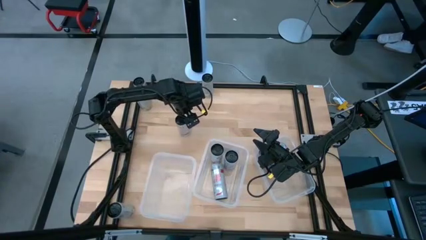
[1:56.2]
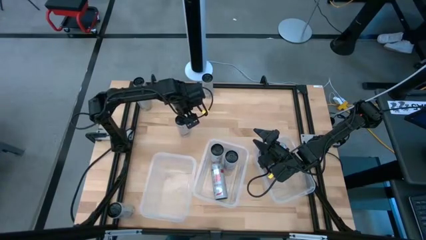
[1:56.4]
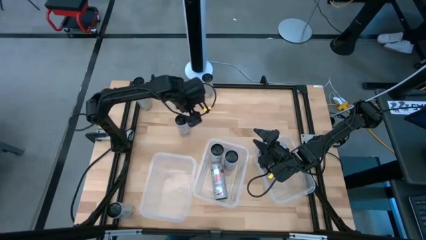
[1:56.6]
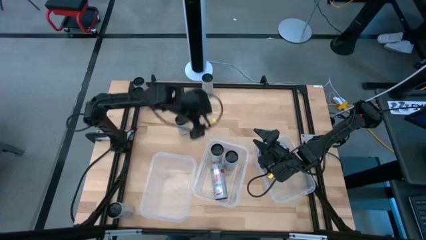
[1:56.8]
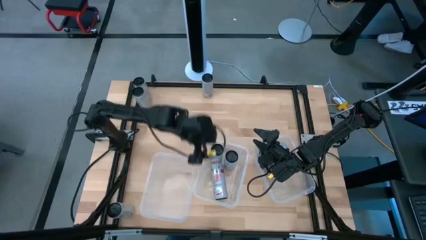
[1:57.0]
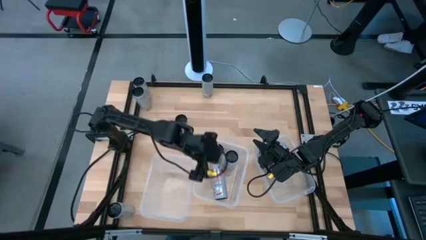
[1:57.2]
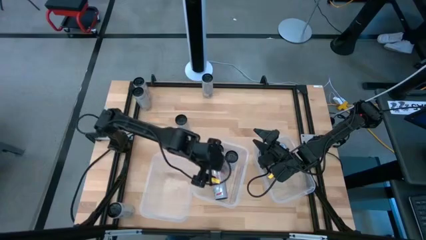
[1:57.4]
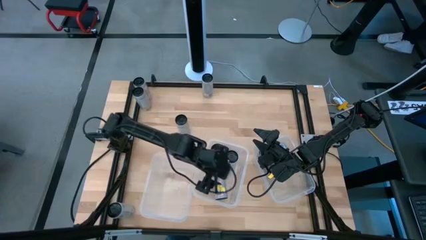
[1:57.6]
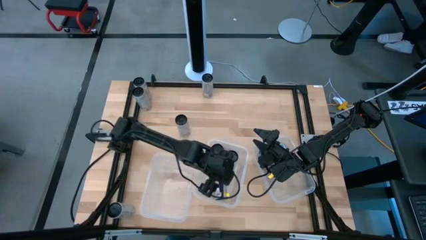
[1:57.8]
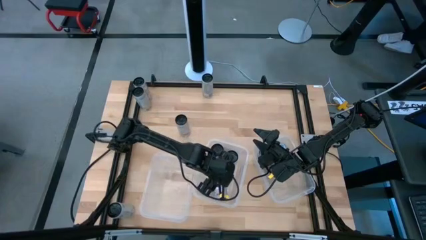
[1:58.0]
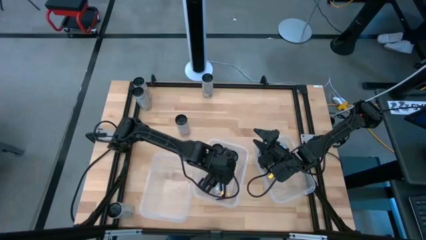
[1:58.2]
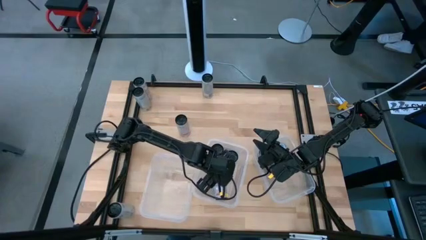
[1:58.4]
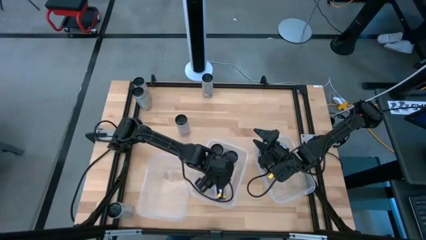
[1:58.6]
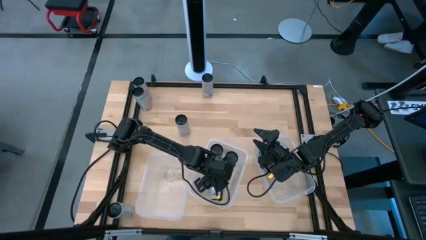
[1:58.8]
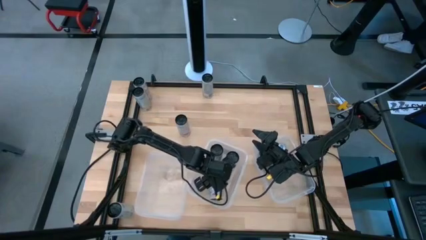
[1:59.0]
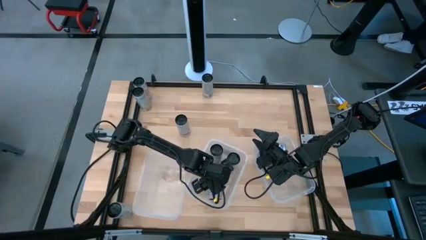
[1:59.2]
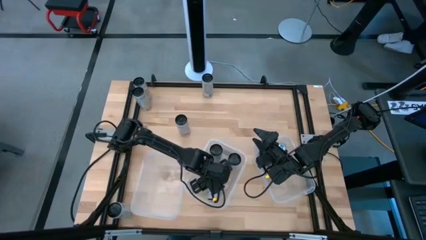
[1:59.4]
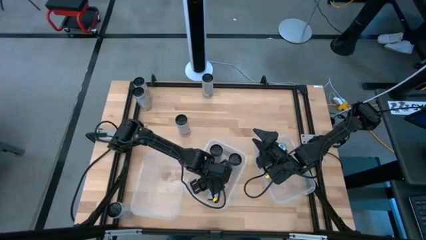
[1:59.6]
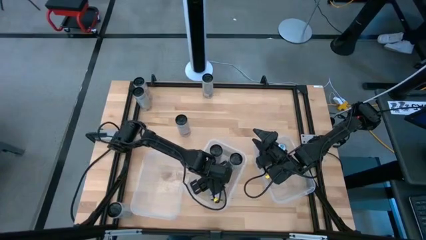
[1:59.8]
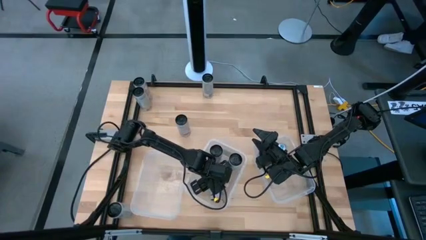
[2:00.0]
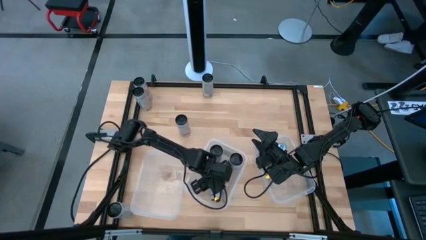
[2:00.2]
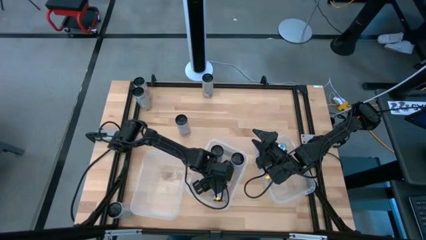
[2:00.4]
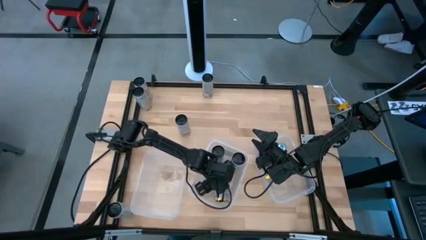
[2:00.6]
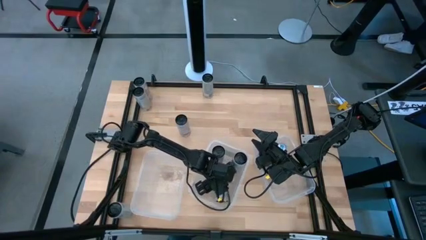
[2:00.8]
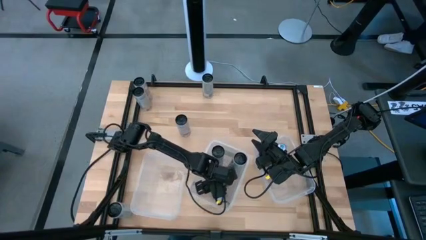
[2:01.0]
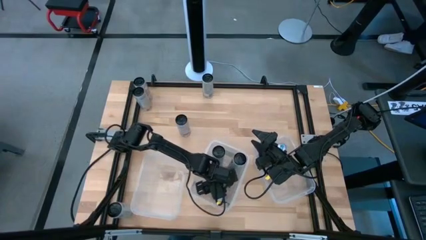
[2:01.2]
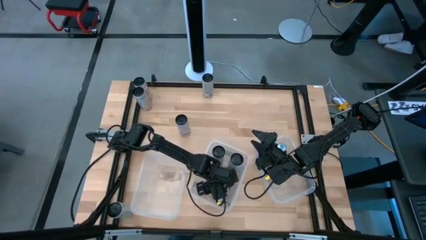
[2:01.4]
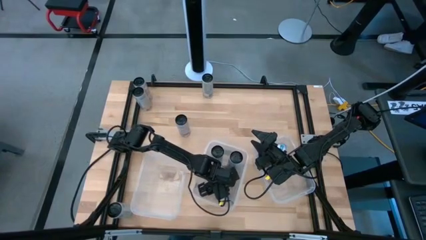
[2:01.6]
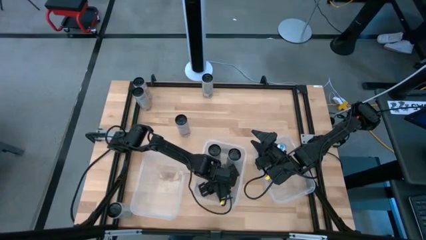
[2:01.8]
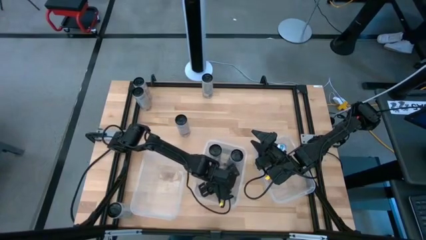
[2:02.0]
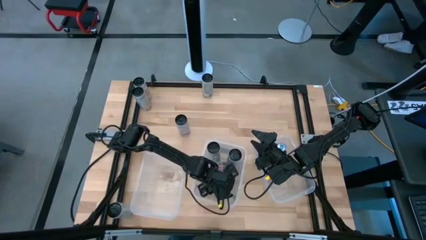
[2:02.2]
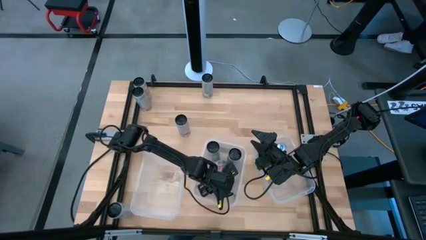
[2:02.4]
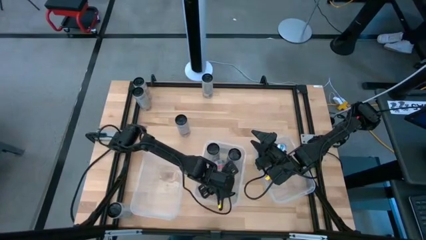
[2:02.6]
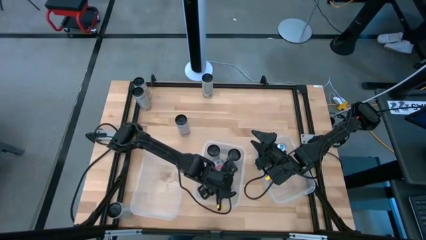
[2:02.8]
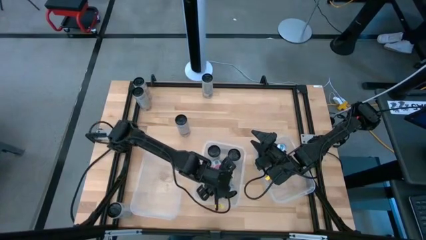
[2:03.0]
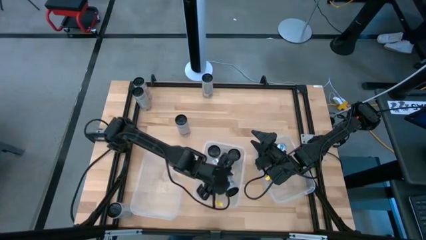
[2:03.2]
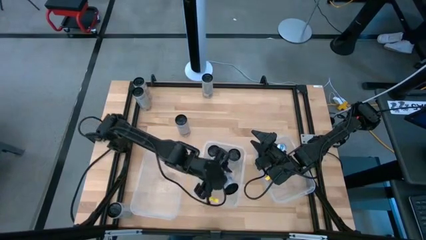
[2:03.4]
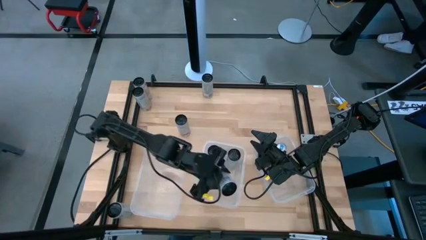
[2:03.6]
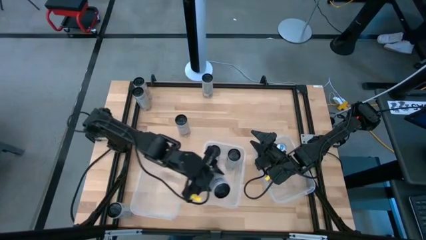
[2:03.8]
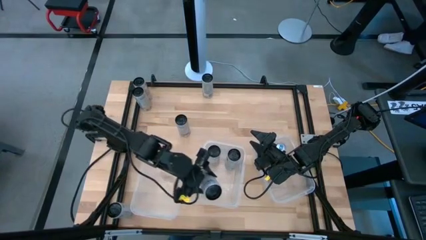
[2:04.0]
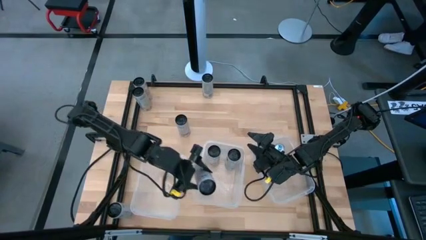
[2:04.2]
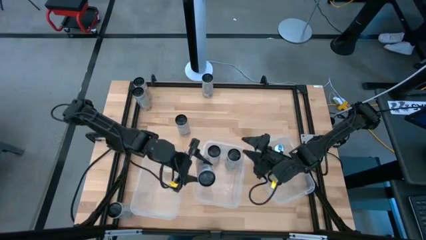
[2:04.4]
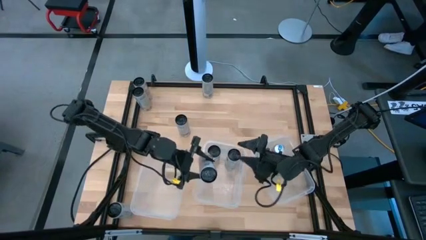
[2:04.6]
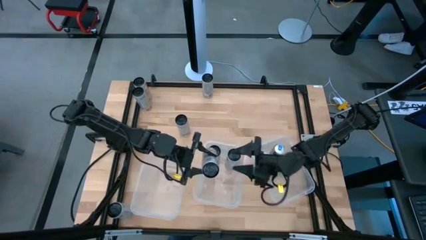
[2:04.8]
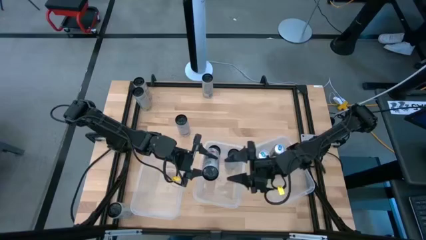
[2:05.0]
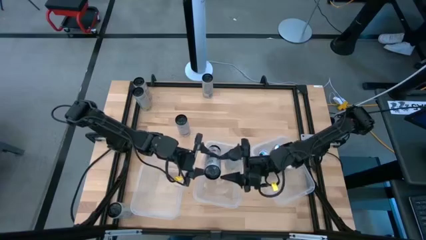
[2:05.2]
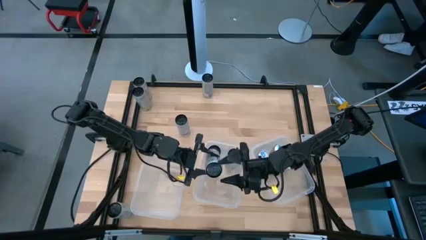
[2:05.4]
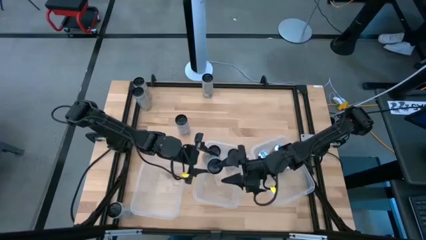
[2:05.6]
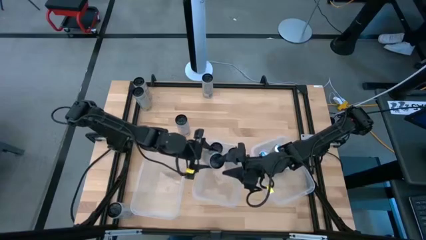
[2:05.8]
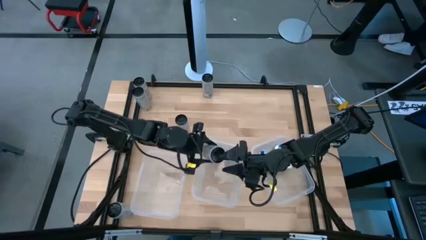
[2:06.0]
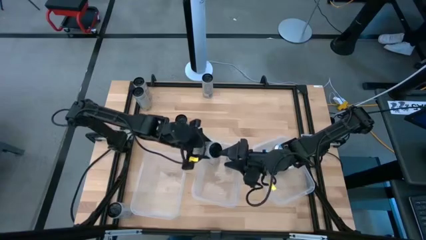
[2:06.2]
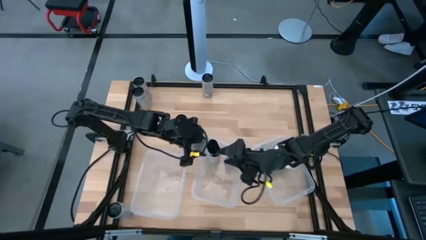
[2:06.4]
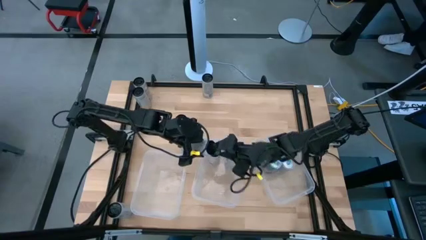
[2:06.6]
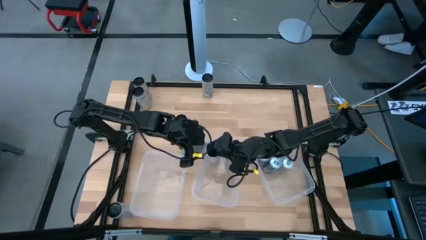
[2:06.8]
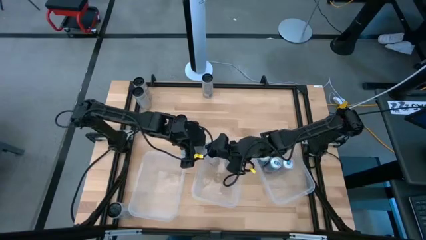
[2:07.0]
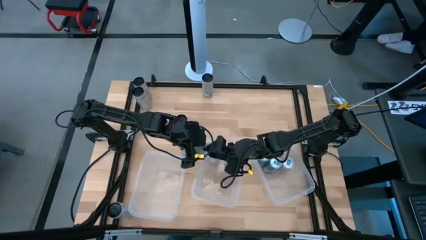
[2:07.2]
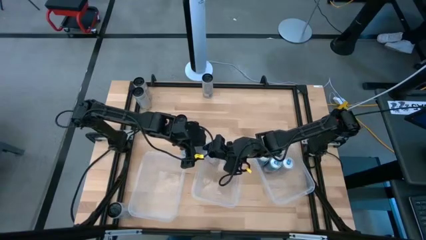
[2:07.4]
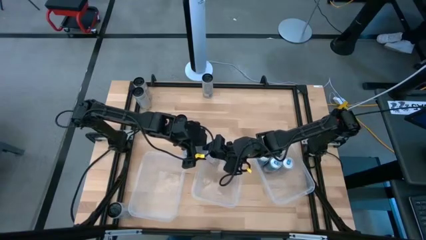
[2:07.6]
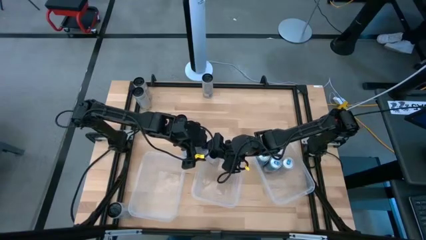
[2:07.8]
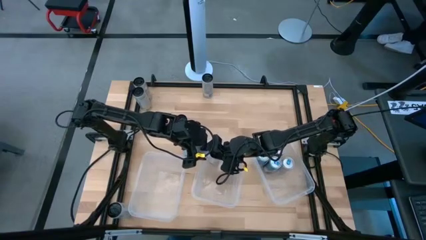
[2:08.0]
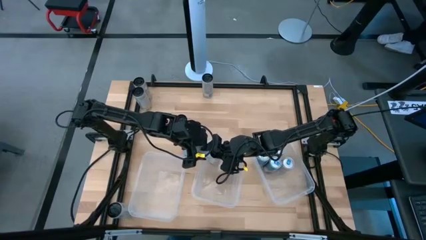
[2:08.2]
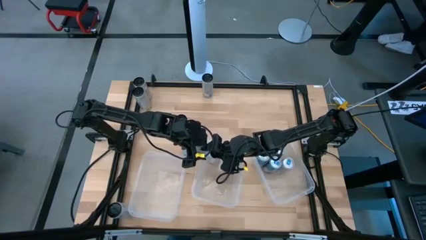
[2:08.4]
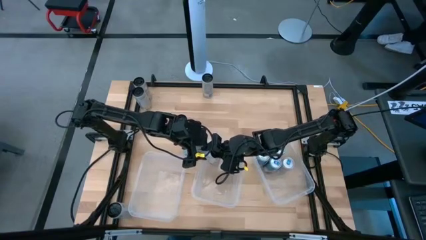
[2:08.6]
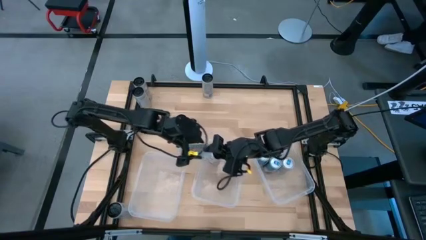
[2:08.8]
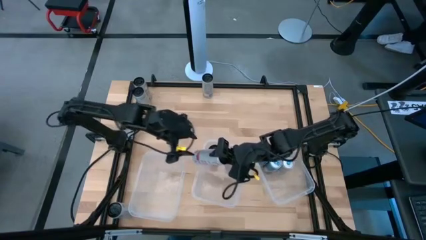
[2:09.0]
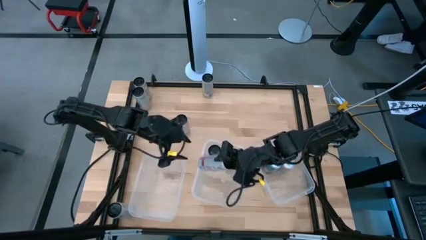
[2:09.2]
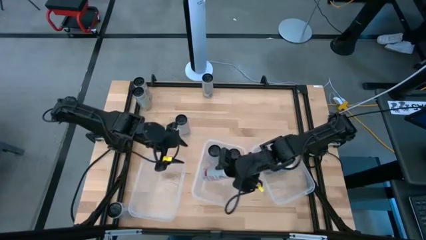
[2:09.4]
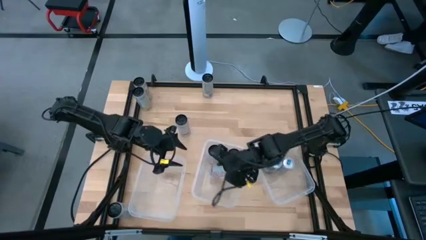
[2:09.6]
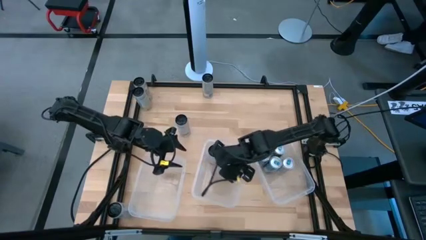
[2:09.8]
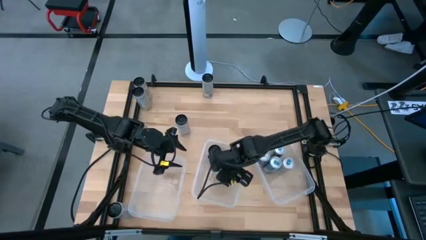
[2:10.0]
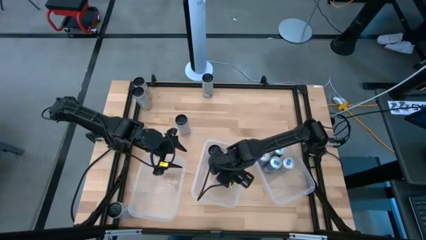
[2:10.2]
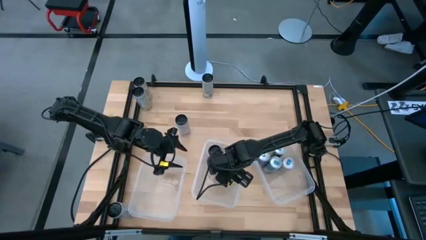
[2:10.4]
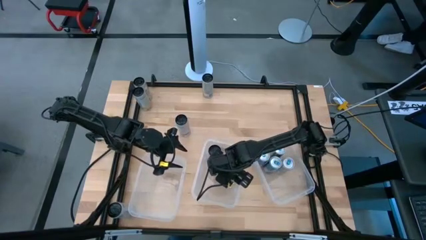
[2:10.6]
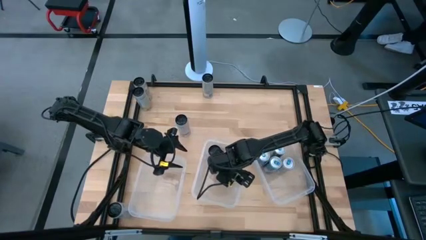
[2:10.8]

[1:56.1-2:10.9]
Task: Sort soda cans
Adjust the white-pink soda can in the middle transparent bin
